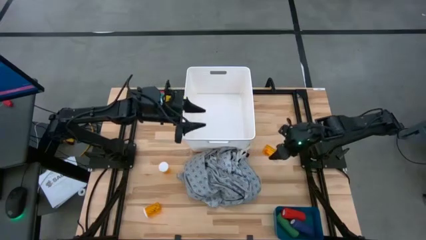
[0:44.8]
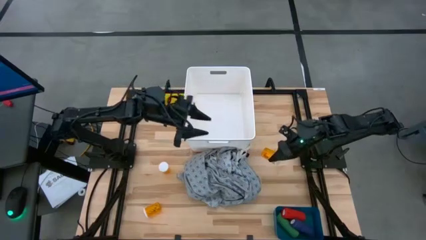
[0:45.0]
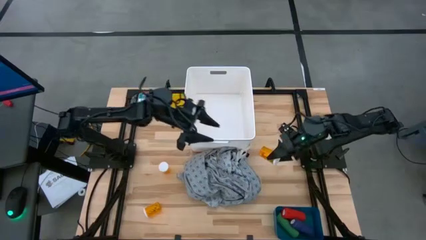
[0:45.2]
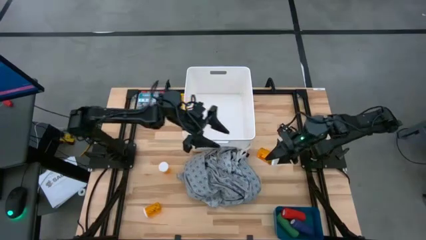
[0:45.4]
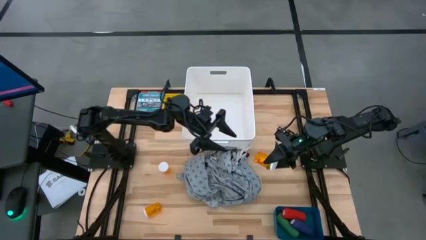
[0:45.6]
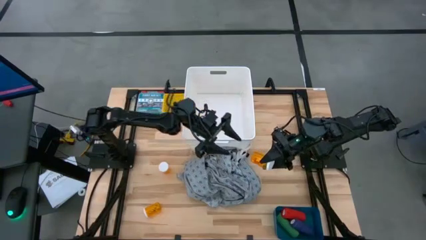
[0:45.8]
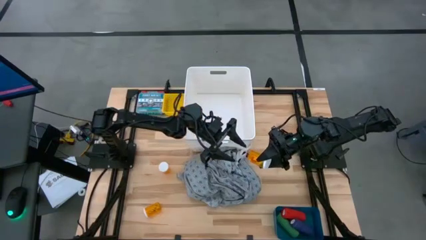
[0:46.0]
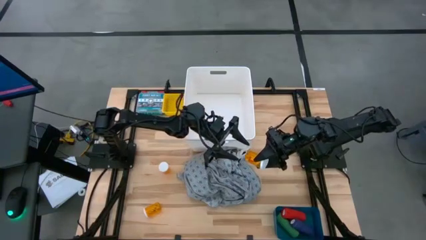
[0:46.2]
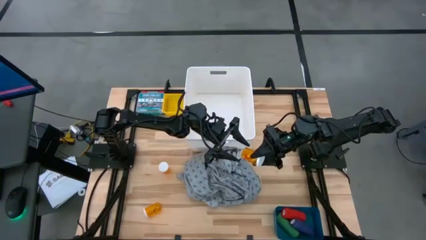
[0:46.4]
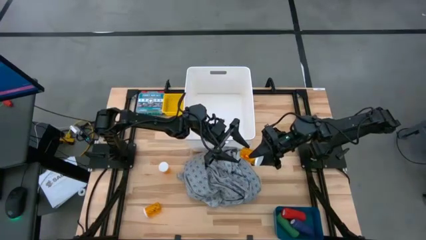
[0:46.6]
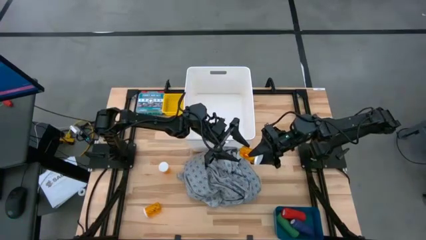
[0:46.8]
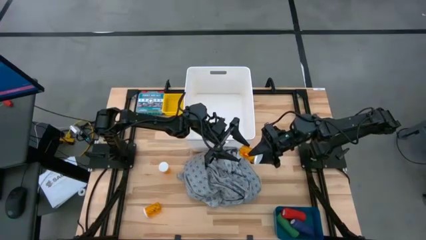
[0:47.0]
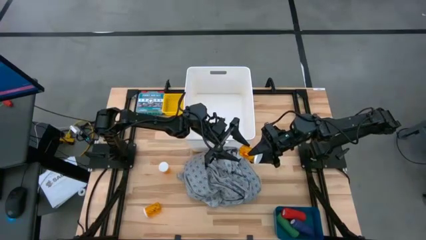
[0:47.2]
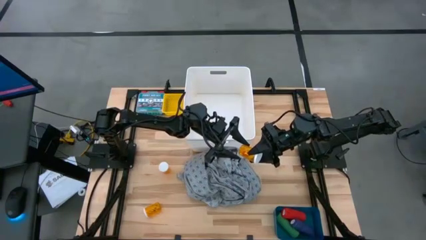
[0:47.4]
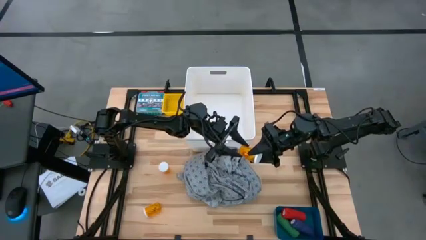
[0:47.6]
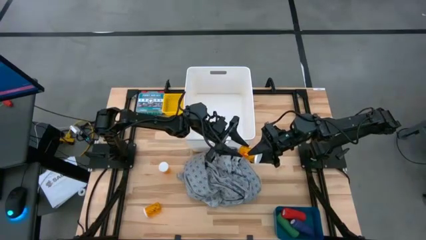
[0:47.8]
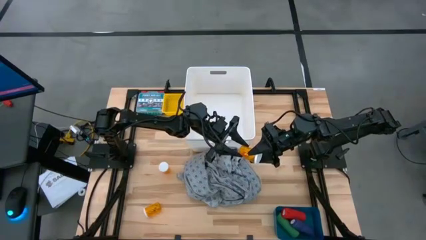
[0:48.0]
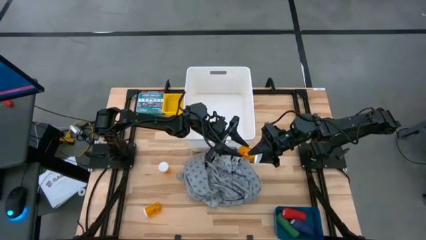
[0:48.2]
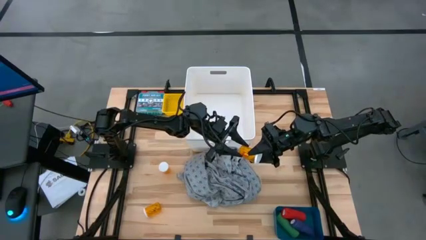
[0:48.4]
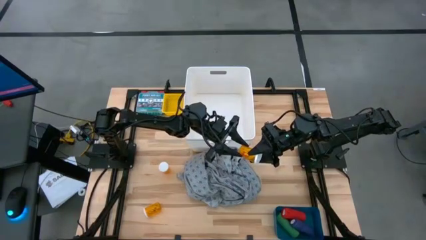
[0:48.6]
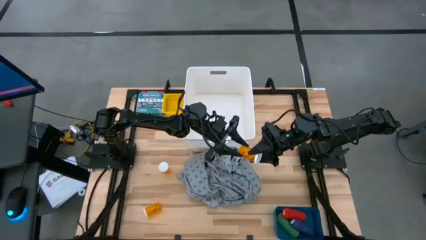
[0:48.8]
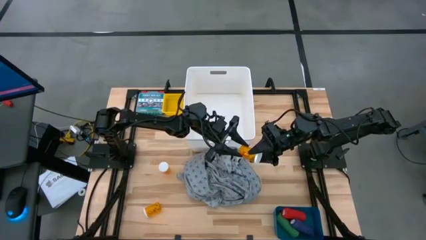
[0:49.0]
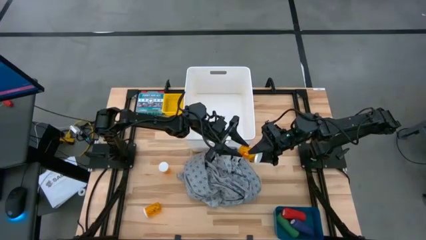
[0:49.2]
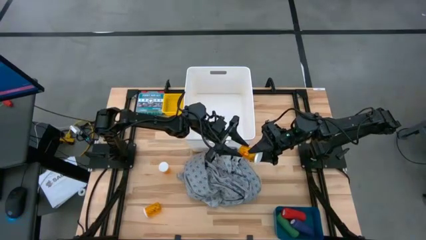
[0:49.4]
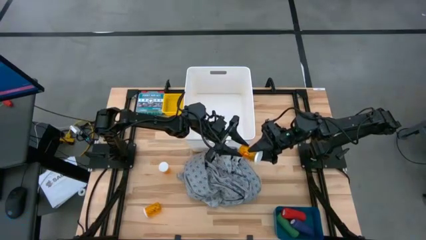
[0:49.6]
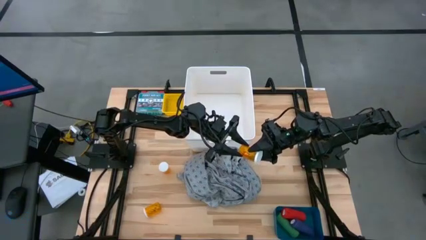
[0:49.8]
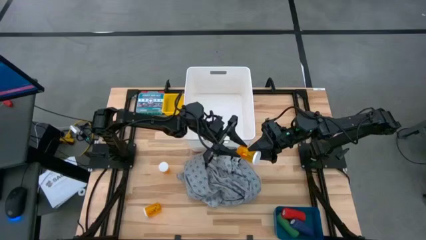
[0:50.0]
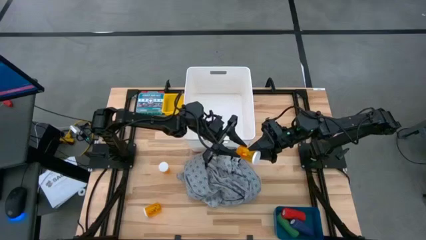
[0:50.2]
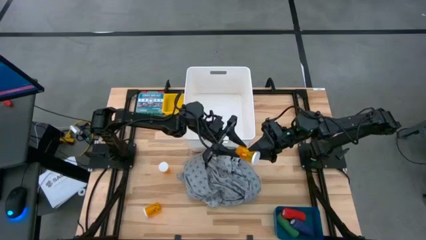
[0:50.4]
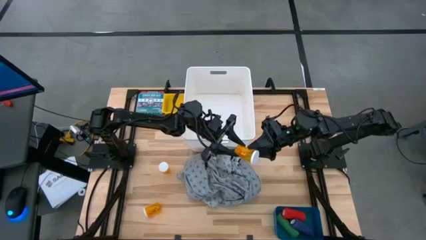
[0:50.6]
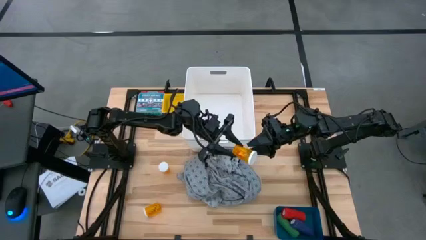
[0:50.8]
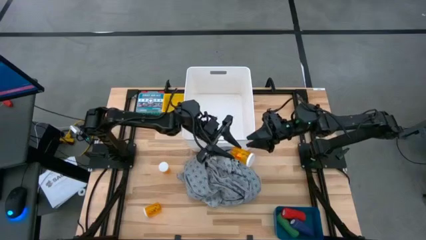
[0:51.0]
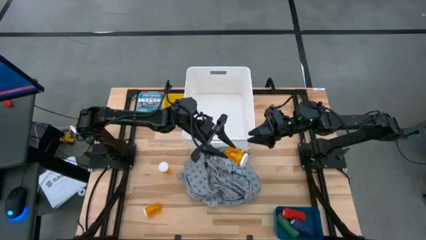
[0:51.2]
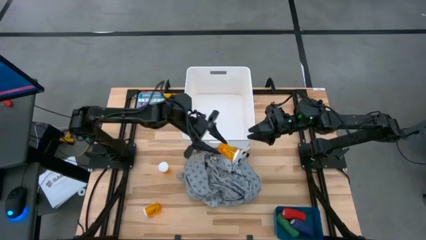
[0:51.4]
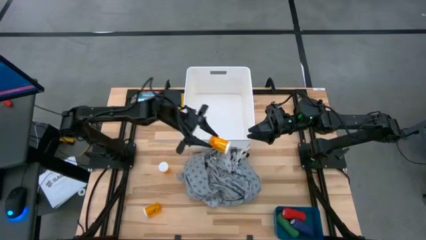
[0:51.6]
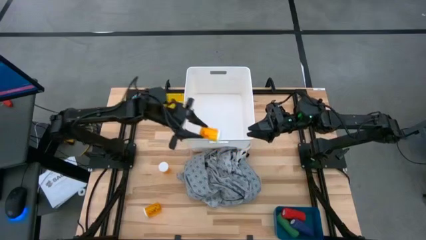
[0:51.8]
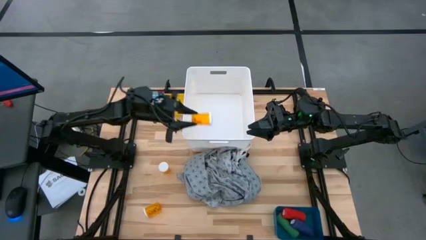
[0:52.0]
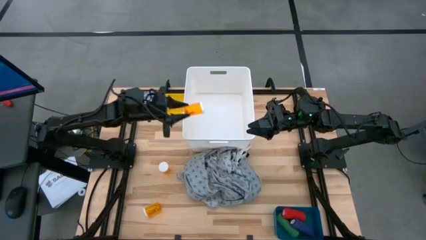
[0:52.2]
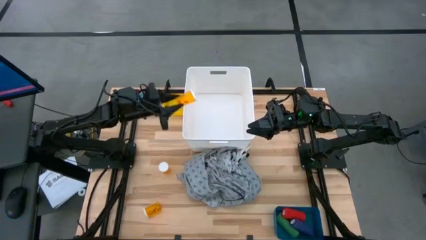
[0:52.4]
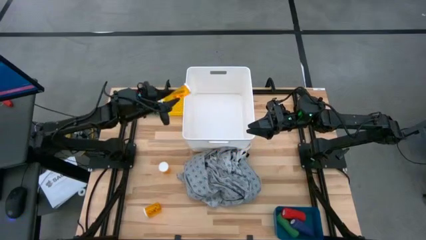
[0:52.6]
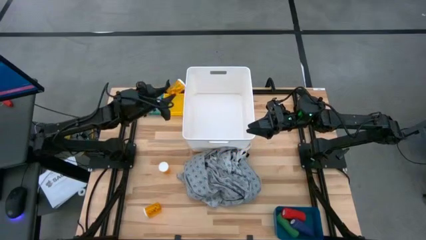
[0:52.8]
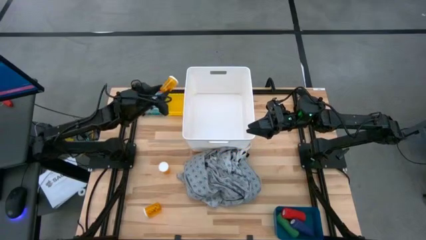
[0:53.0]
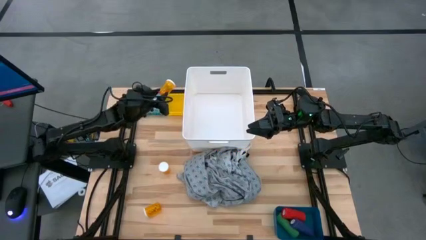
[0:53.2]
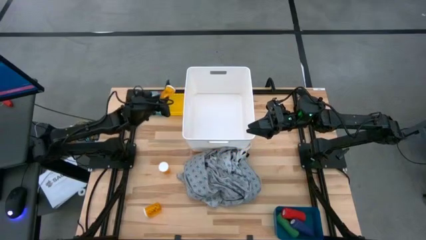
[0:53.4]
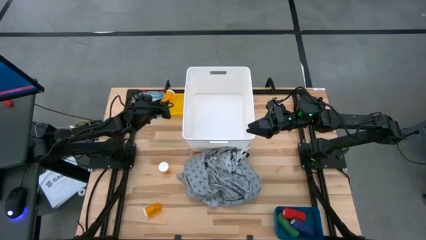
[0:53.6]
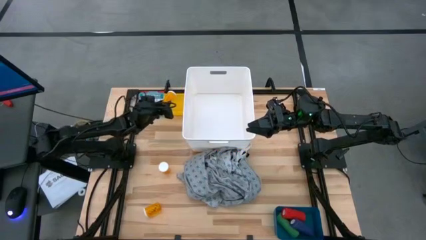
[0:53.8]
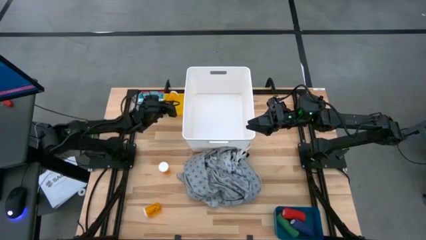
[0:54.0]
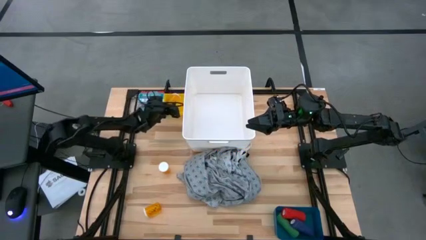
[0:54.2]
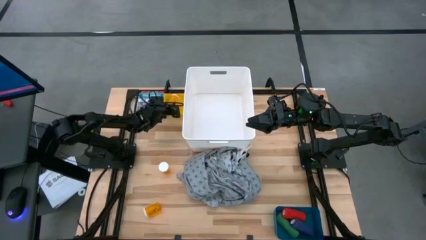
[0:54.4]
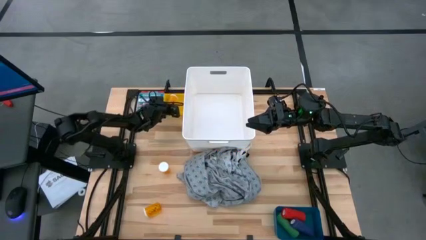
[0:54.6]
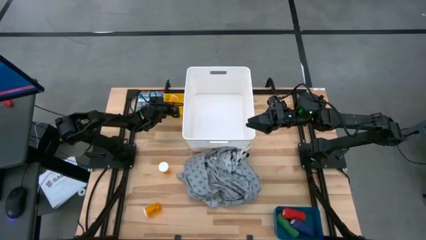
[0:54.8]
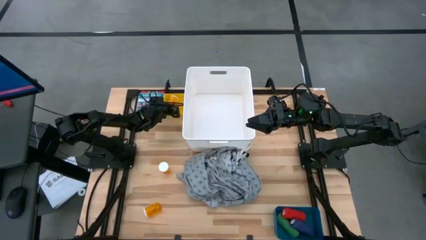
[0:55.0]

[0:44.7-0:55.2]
Task: Pick & place medical supplies in basket/bin
Put the top orange pill bottle into the yellow bin

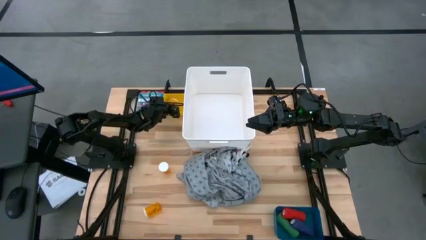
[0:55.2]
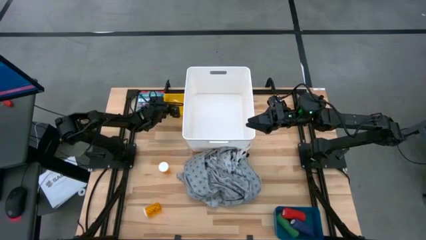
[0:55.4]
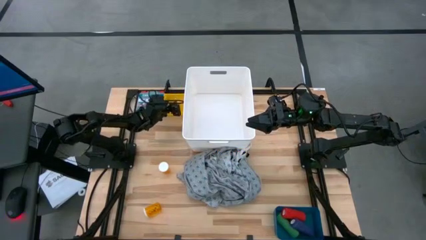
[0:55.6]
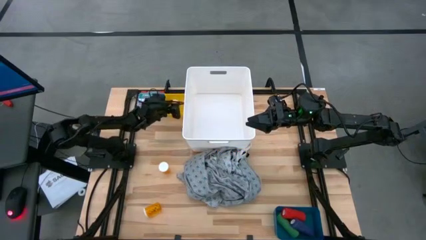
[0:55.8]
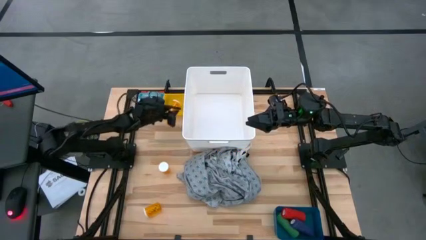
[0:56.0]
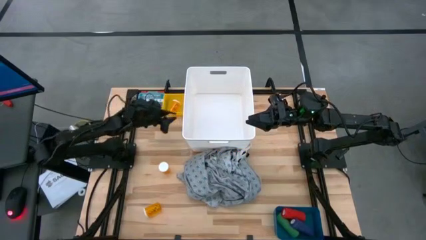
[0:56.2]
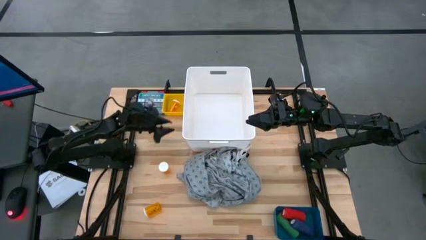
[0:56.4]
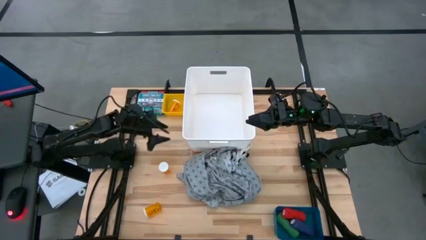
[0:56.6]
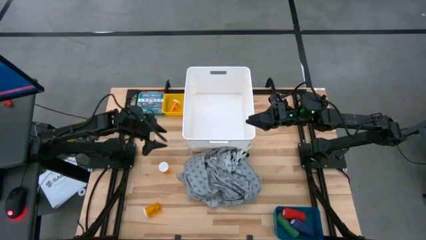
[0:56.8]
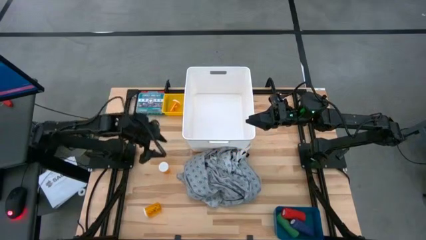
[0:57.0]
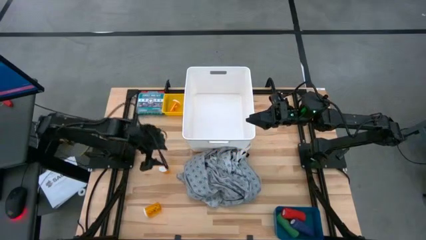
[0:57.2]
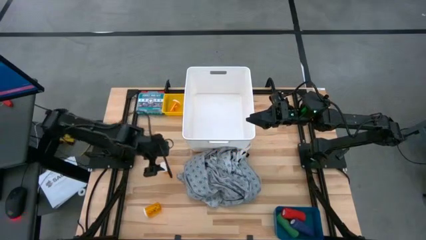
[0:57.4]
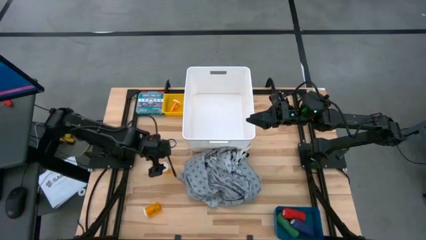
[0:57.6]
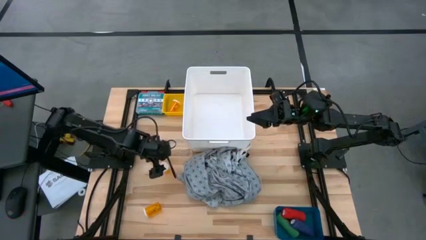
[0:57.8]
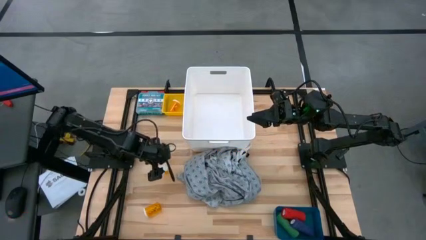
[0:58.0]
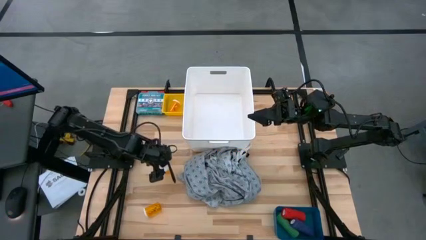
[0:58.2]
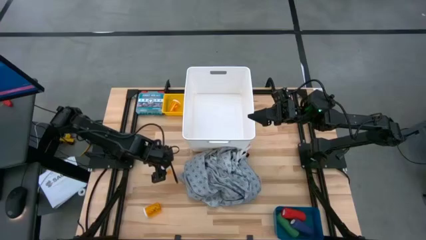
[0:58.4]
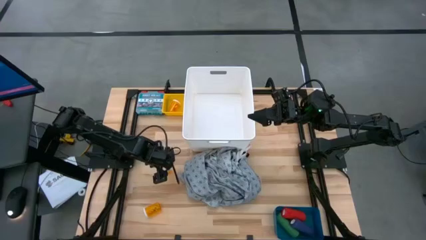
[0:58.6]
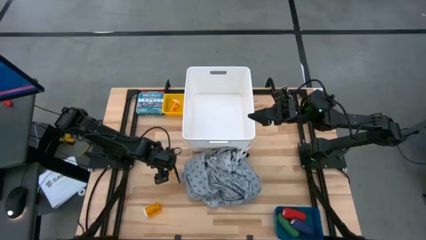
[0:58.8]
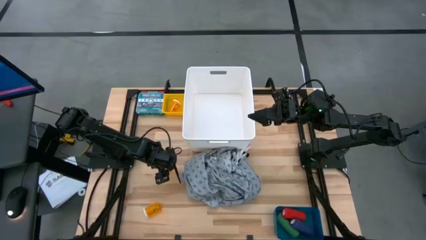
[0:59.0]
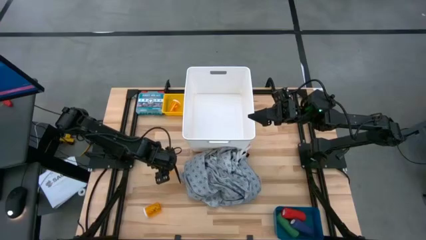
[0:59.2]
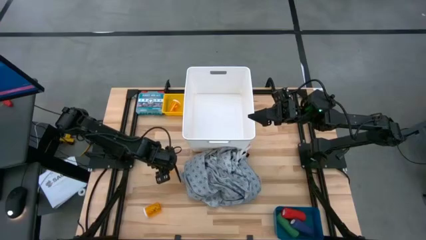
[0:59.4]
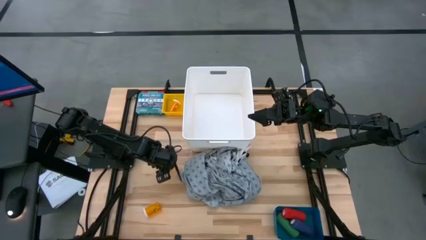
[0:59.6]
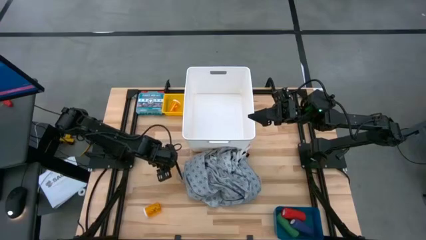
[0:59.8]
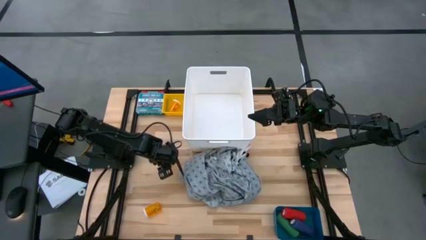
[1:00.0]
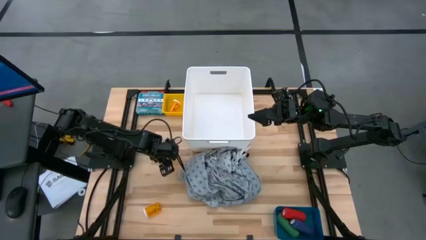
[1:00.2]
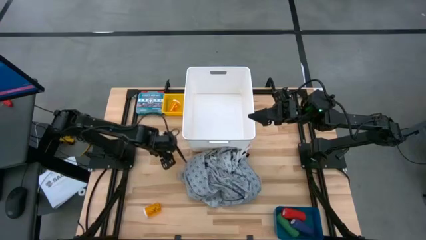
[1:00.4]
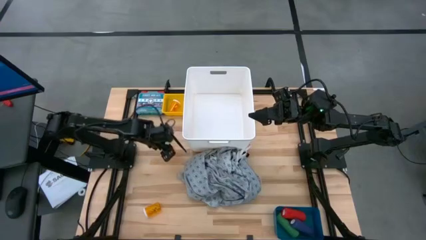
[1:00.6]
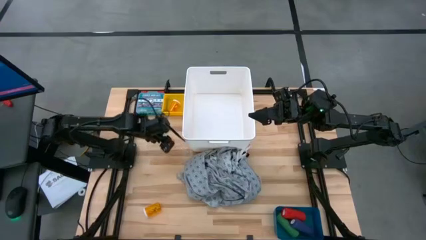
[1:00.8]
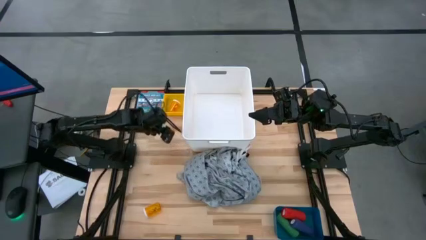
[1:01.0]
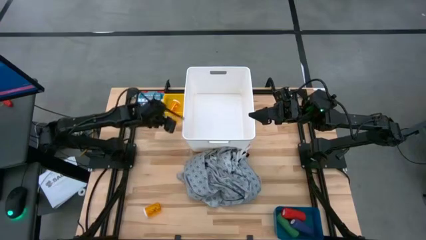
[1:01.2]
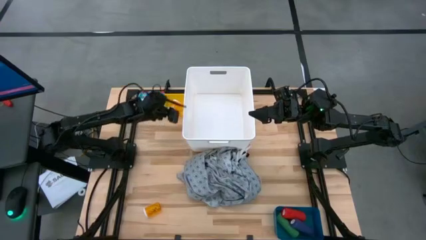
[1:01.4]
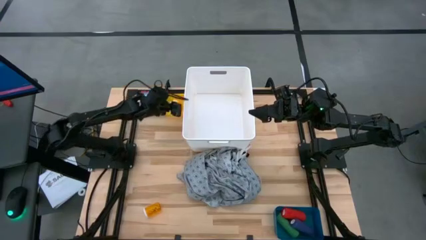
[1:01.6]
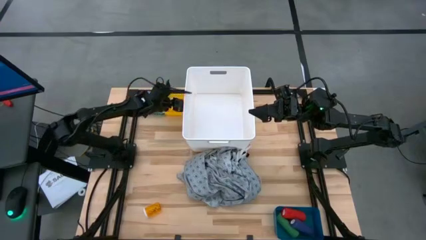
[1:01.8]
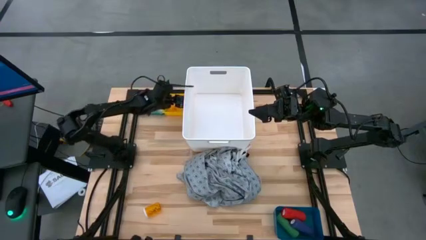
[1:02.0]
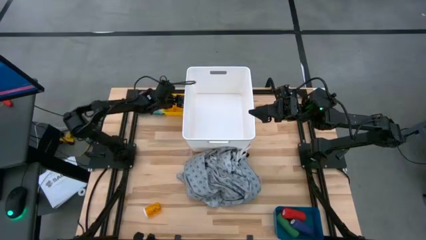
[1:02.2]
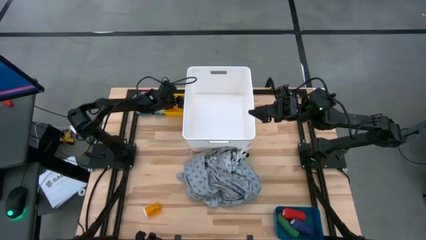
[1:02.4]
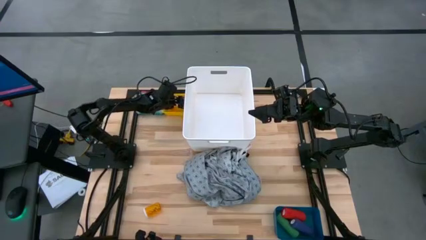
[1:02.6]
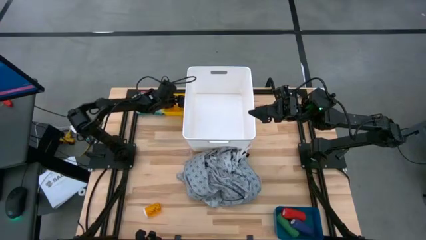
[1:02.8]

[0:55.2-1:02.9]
Put the top orange pill bottle into the yellow bin
